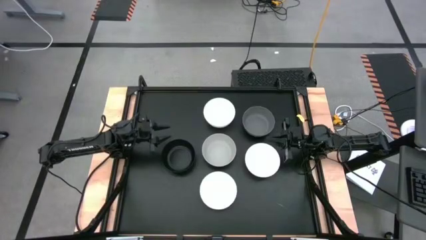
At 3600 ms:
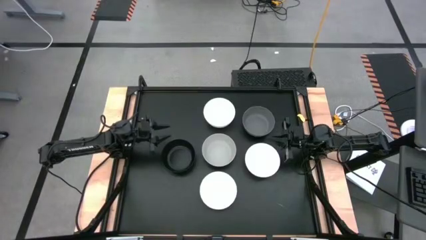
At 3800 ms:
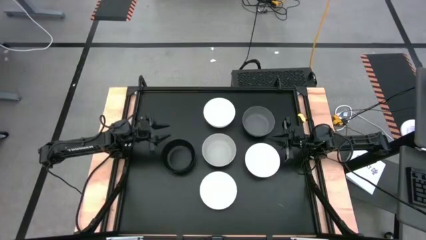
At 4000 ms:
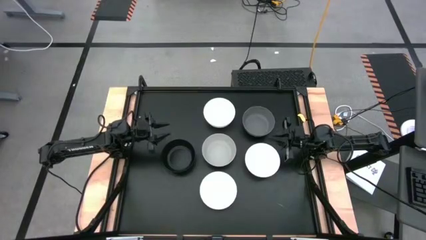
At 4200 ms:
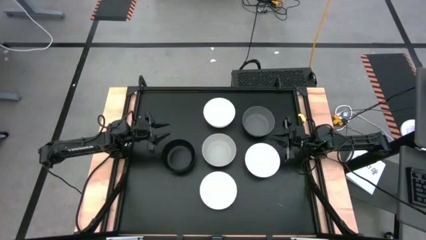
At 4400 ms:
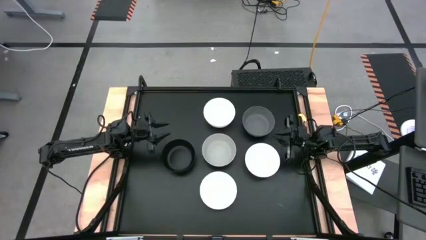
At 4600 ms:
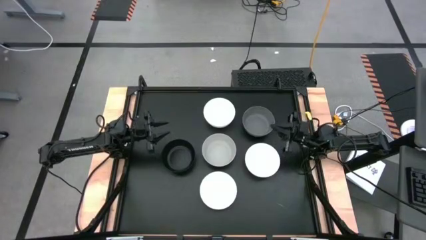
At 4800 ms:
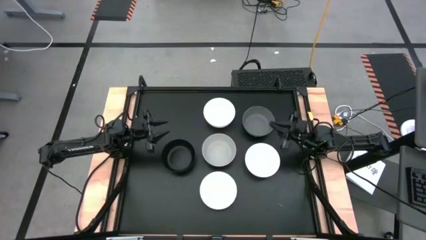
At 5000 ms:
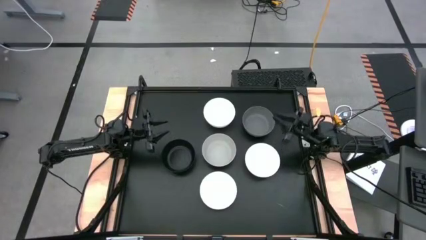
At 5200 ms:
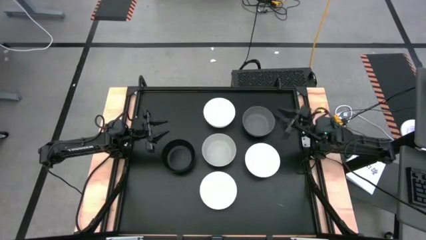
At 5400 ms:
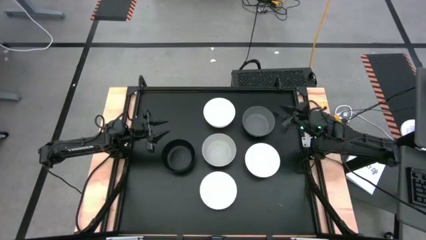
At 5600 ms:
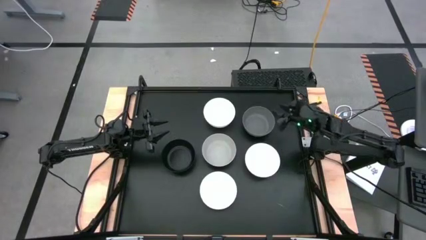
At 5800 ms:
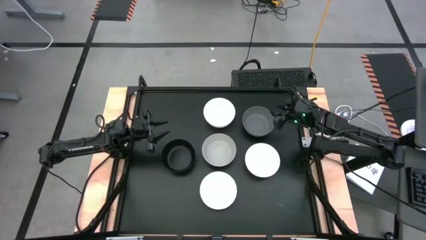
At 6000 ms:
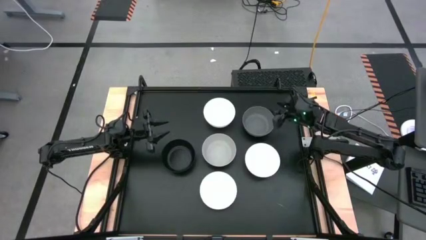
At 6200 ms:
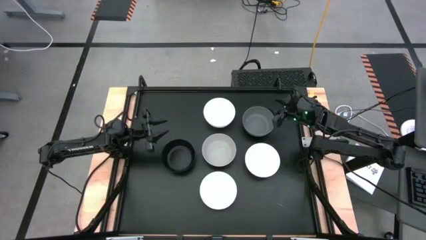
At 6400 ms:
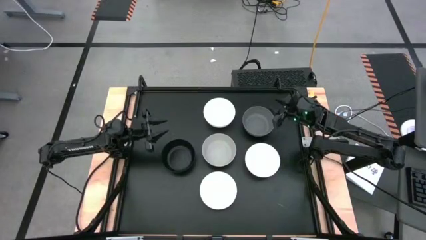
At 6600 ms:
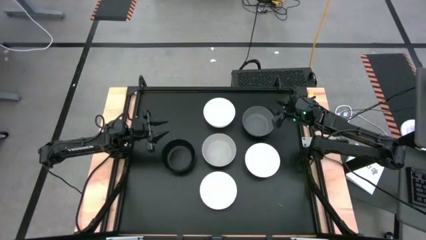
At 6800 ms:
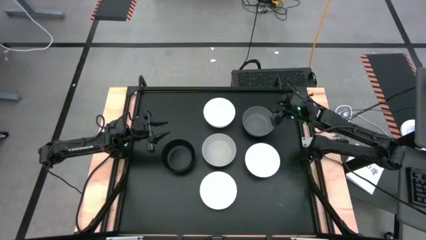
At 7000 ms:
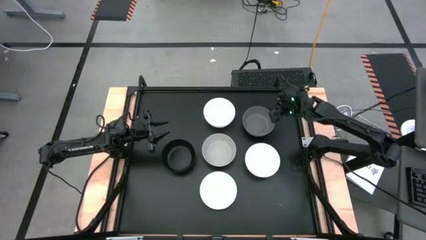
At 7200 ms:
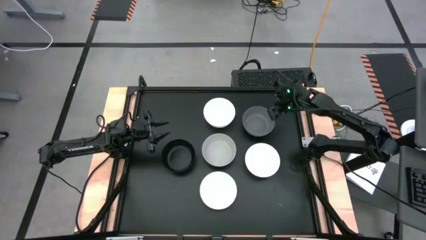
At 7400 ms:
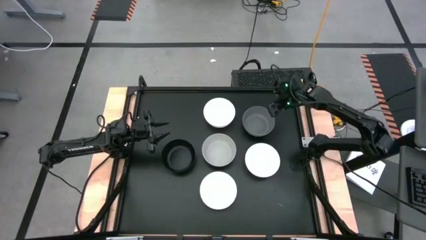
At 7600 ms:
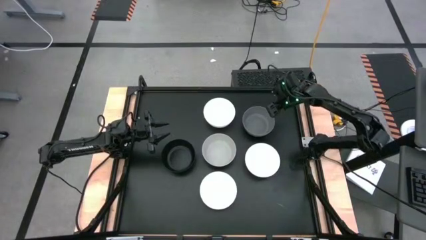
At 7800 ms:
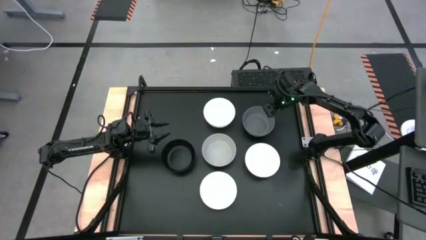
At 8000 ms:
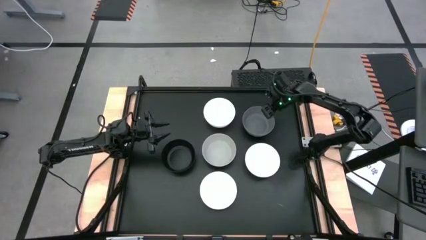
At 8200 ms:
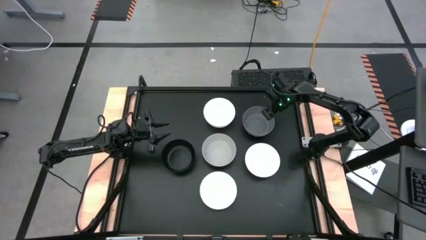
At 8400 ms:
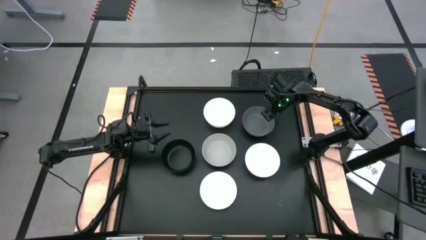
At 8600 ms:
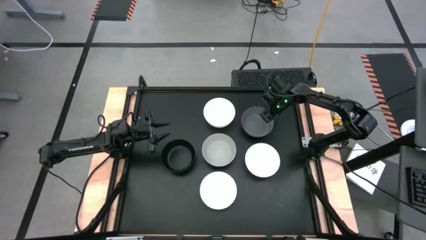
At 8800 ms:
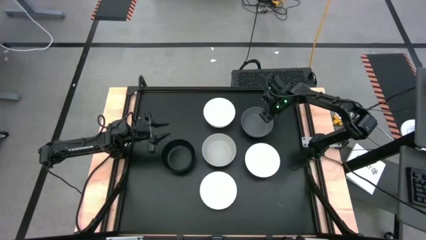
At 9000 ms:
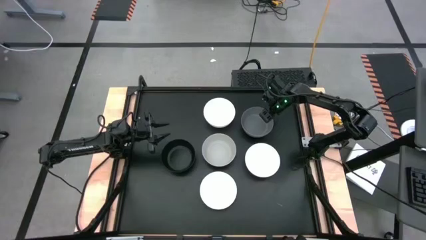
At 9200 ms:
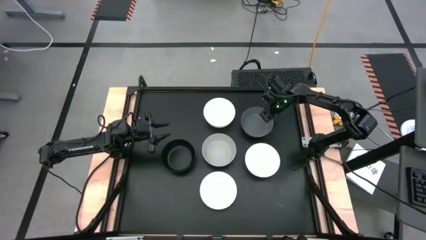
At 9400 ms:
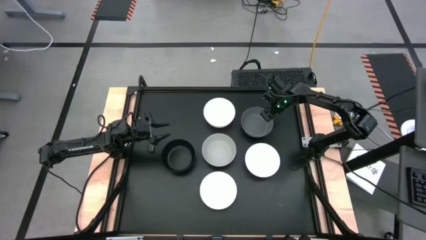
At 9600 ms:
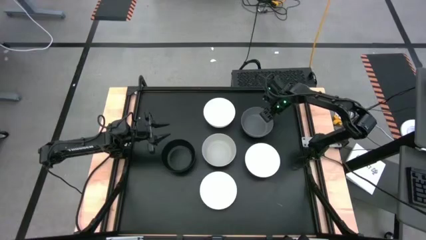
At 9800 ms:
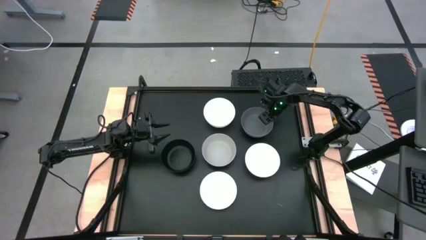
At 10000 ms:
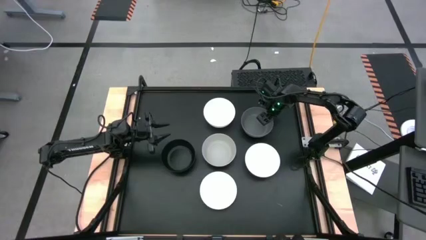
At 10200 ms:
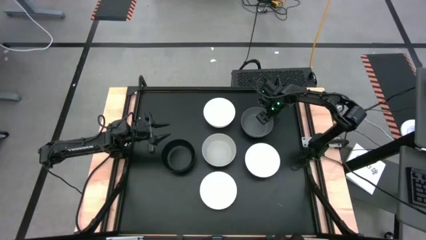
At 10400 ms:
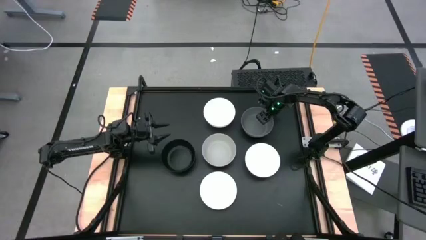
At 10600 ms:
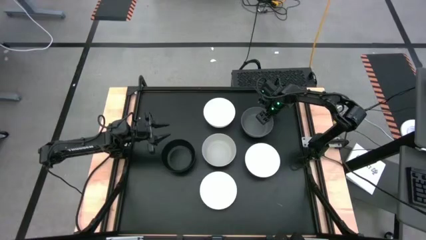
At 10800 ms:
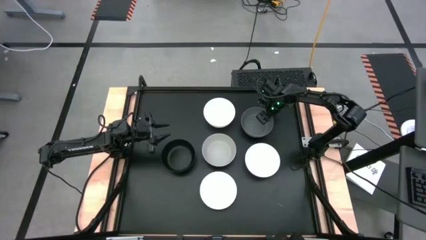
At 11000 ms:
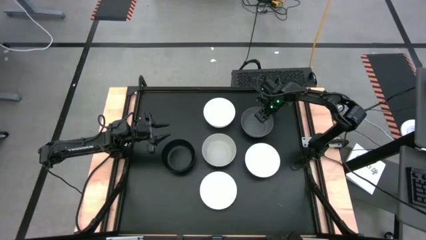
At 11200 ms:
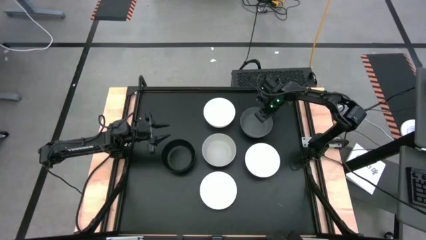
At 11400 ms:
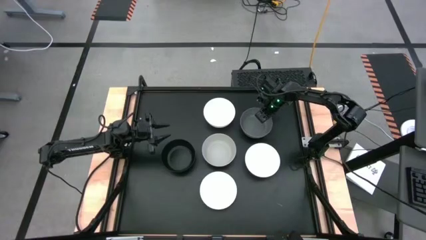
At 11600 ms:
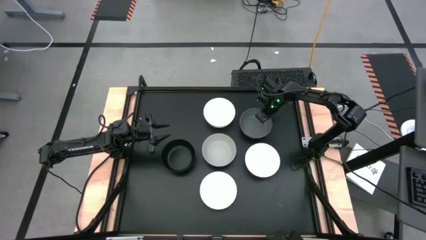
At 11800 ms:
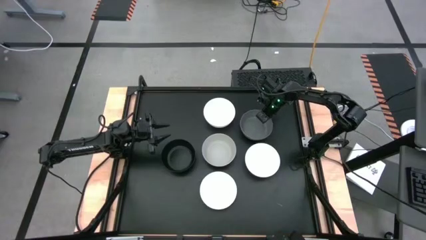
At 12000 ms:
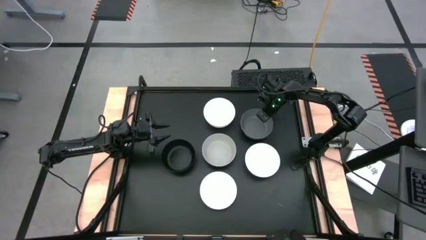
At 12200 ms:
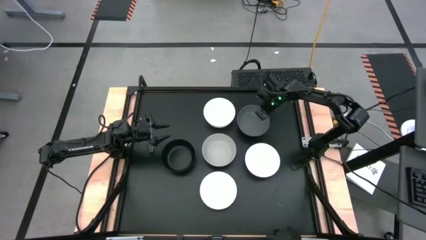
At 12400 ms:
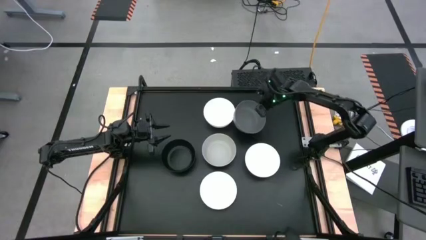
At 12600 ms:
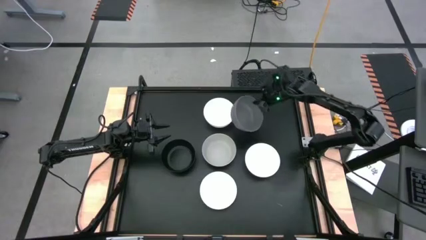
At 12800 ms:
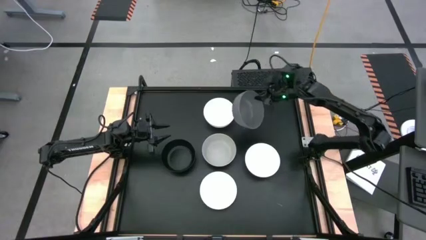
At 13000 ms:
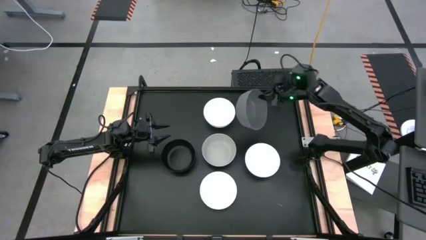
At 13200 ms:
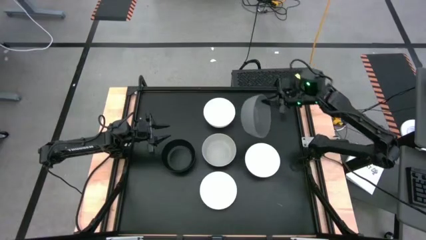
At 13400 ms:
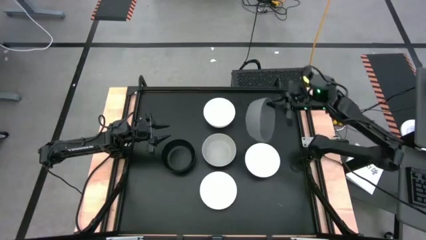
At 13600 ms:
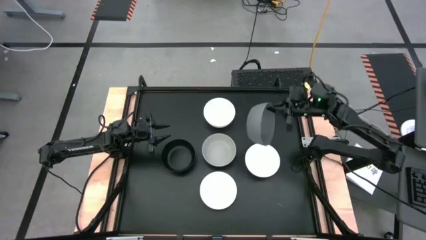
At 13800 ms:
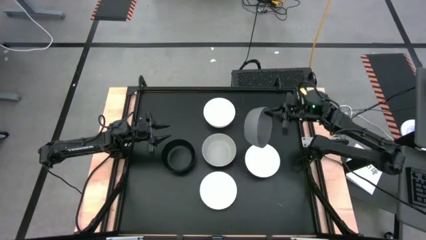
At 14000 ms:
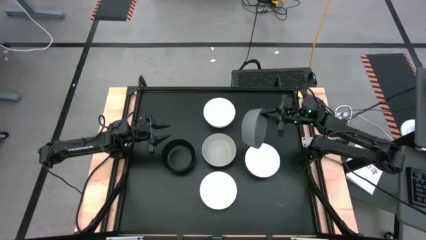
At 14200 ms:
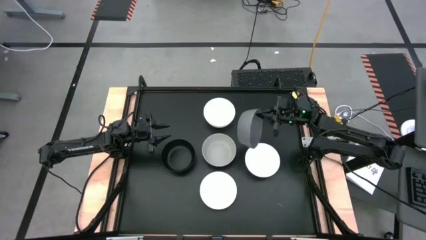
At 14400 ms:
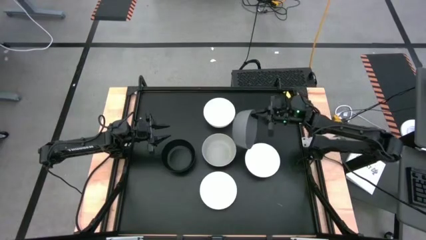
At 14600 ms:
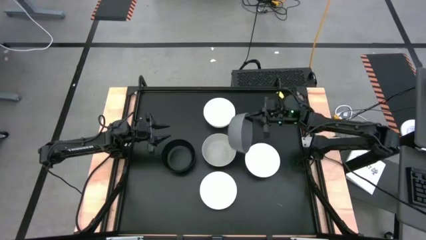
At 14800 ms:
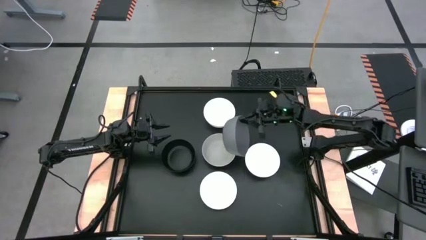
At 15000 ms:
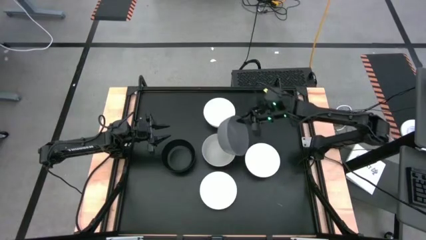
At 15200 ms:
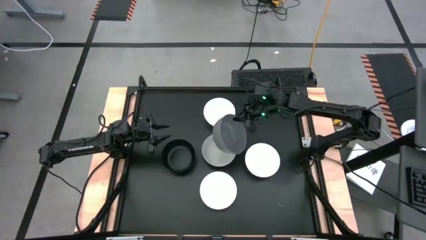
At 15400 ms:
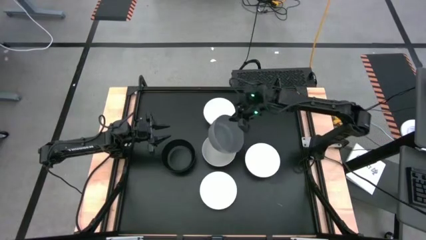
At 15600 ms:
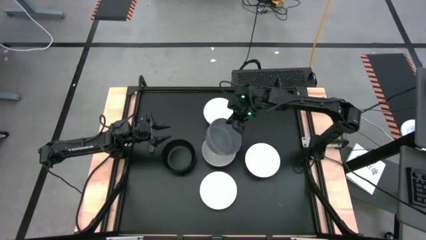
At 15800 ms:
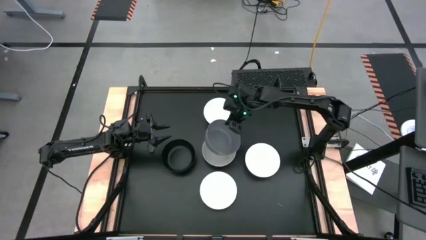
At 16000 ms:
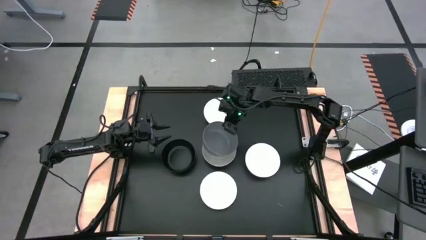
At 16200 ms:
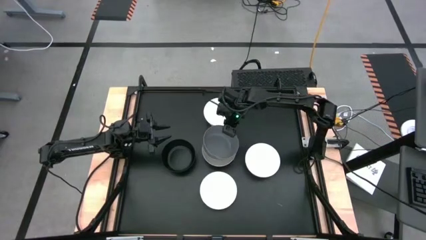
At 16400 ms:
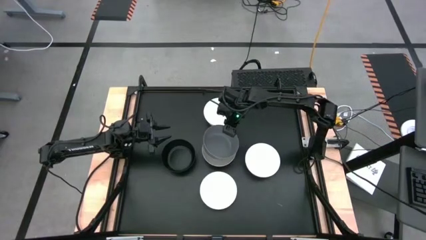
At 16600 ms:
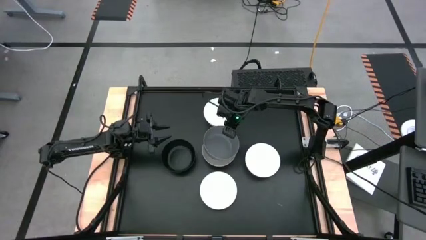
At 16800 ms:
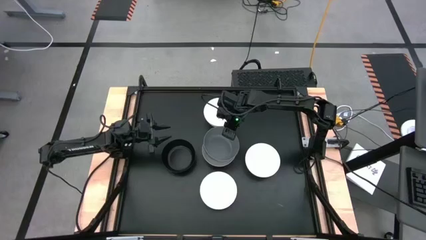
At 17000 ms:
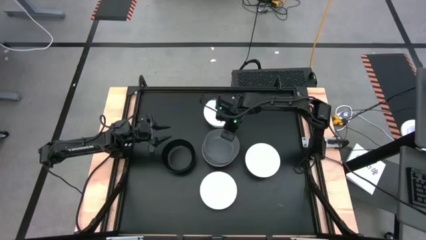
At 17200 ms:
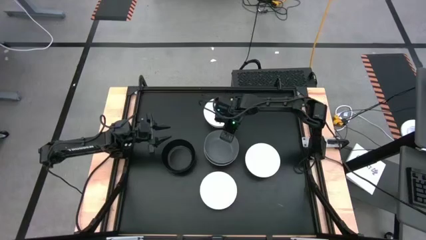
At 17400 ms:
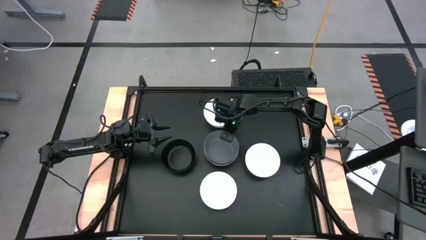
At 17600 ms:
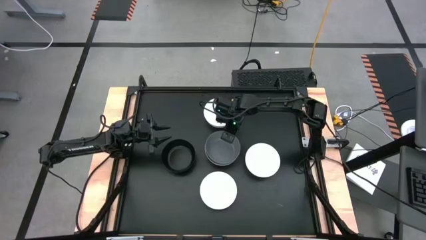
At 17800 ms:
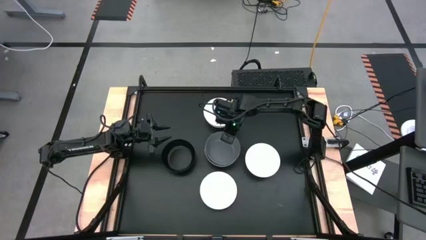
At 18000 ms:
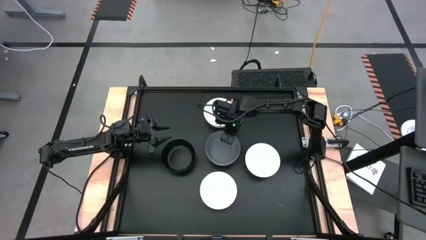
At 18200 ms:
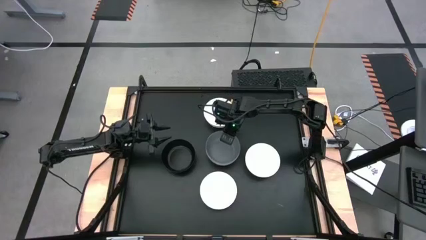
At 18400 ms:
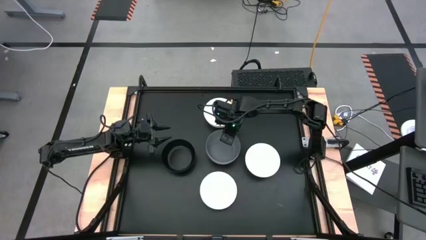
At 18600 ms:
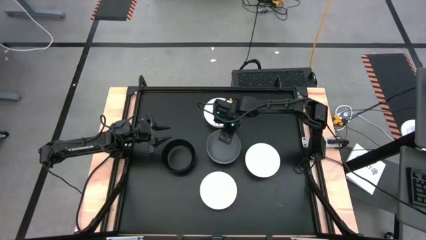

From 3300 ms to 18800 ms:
Task: Nest bowls inside each other
Stack the gray bowl on top of the light gray bowl
